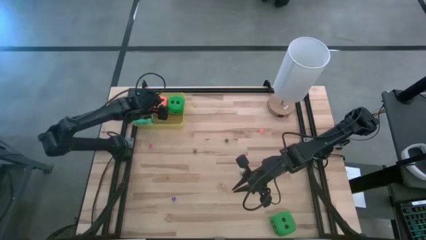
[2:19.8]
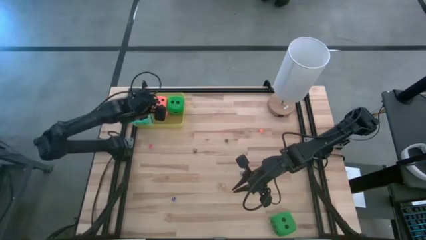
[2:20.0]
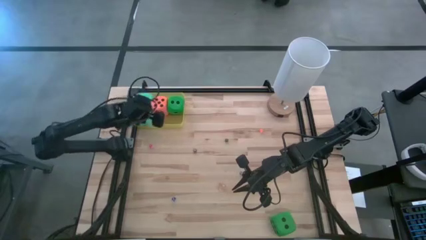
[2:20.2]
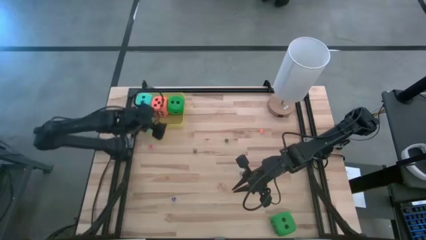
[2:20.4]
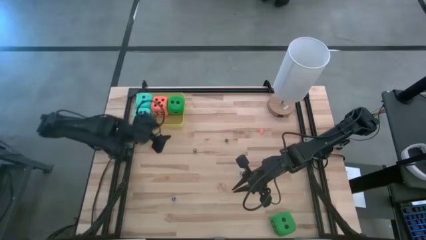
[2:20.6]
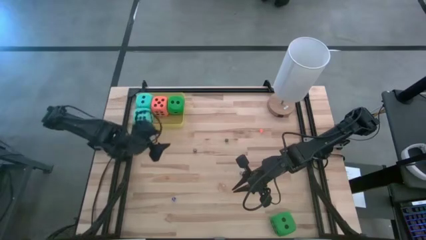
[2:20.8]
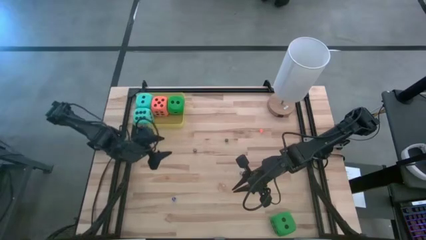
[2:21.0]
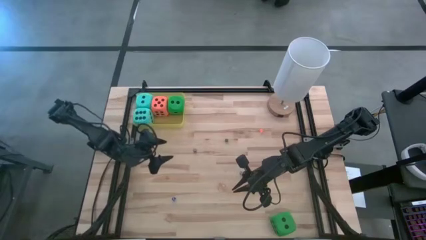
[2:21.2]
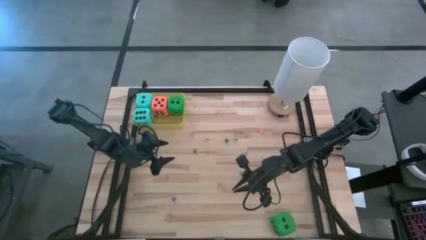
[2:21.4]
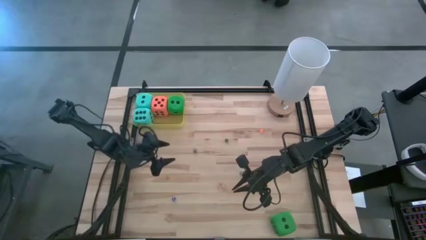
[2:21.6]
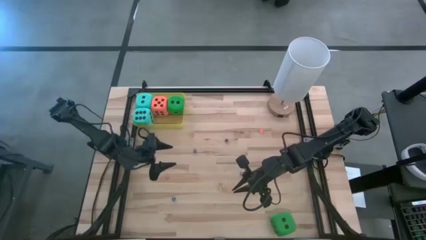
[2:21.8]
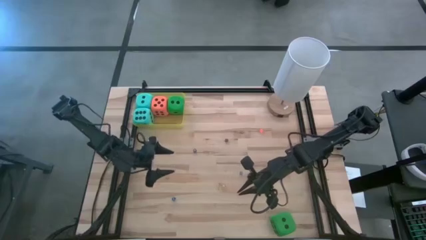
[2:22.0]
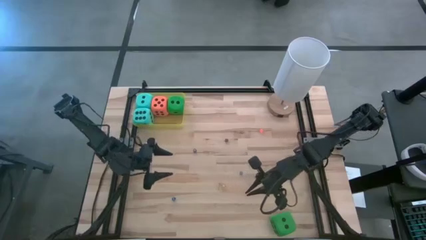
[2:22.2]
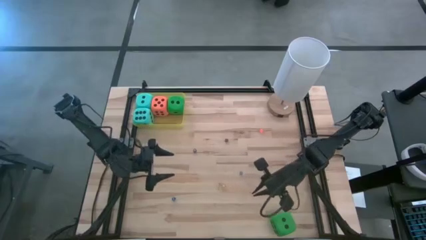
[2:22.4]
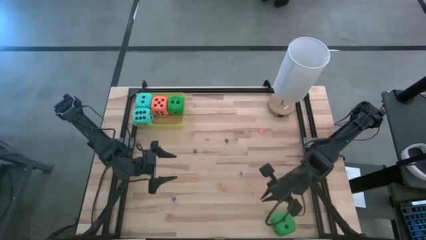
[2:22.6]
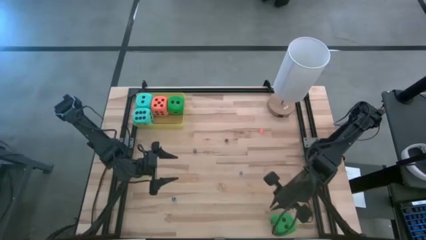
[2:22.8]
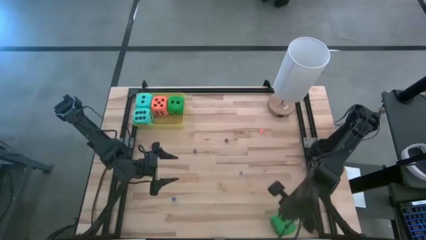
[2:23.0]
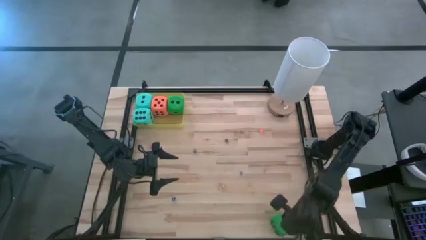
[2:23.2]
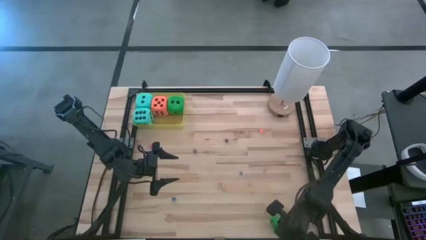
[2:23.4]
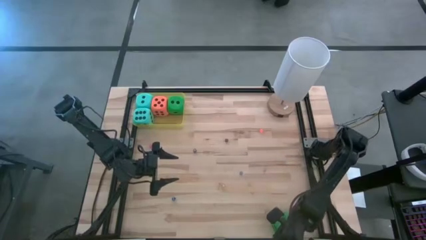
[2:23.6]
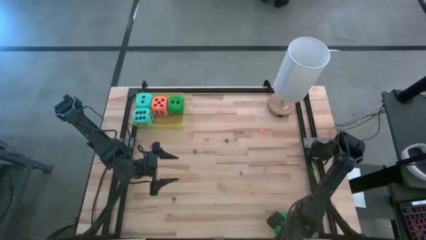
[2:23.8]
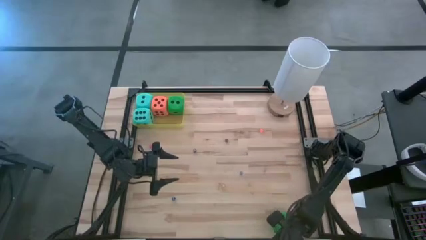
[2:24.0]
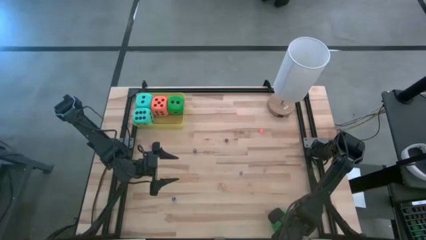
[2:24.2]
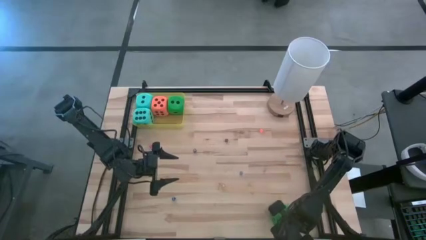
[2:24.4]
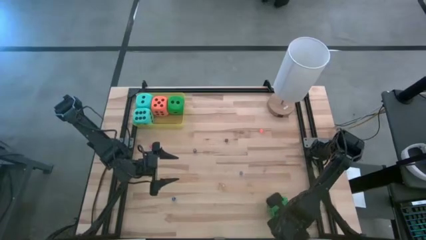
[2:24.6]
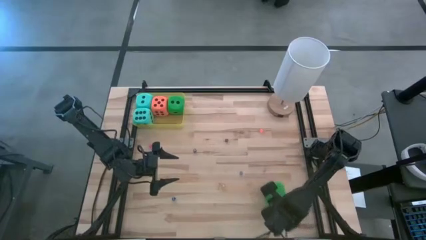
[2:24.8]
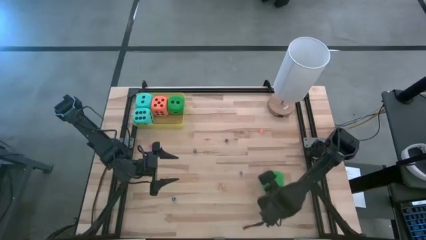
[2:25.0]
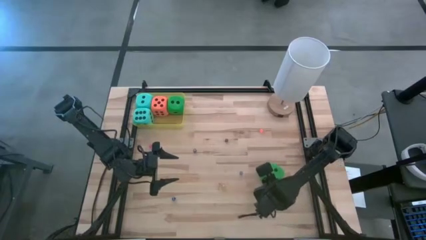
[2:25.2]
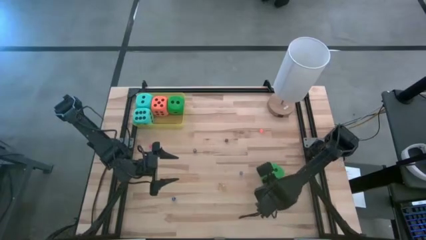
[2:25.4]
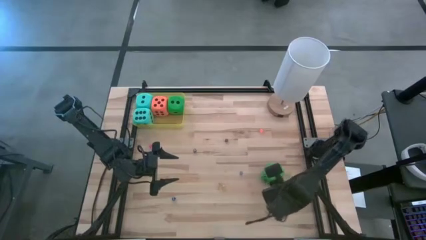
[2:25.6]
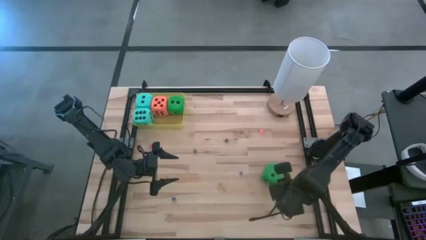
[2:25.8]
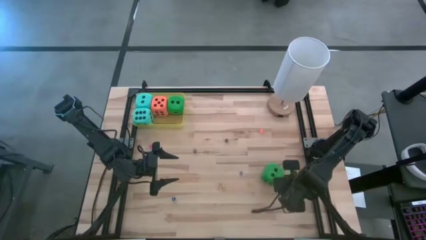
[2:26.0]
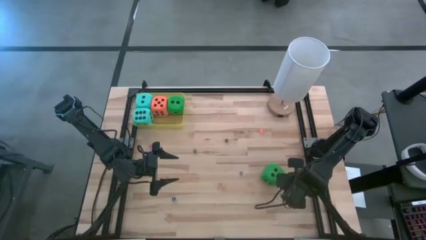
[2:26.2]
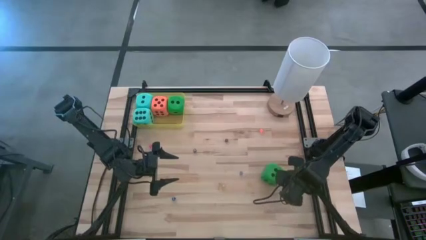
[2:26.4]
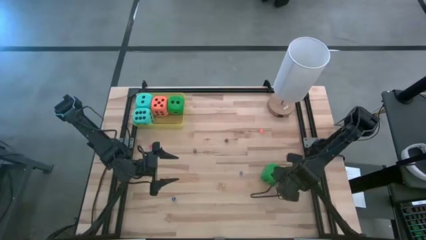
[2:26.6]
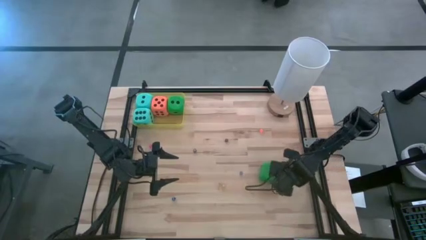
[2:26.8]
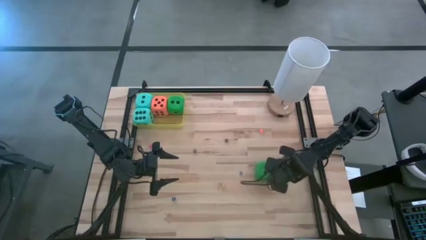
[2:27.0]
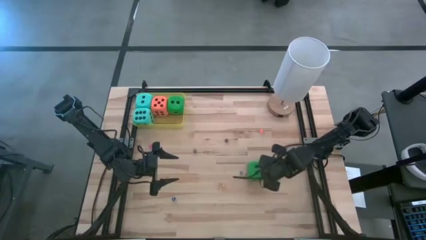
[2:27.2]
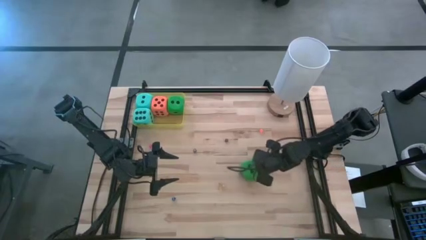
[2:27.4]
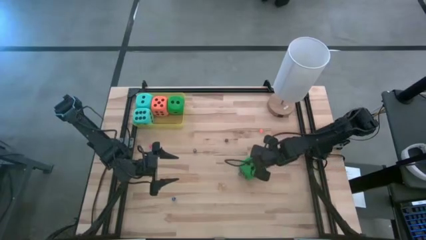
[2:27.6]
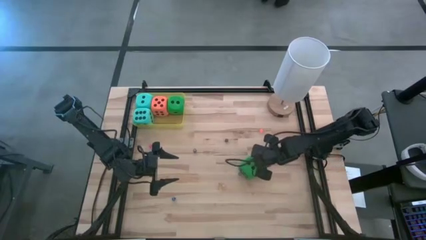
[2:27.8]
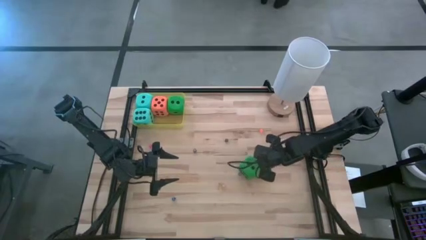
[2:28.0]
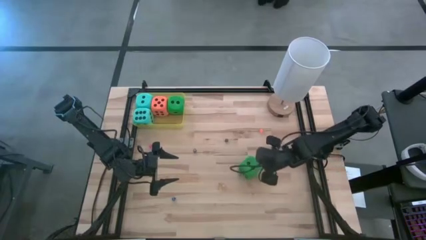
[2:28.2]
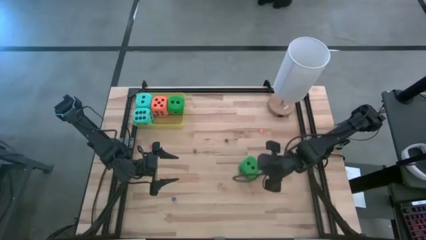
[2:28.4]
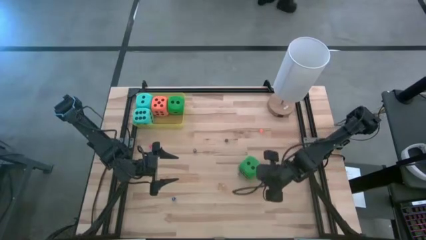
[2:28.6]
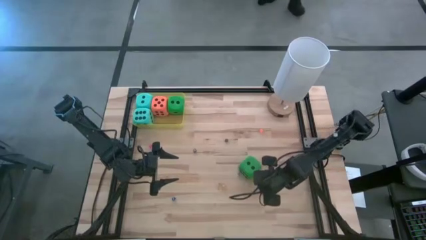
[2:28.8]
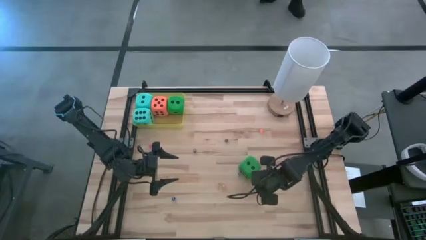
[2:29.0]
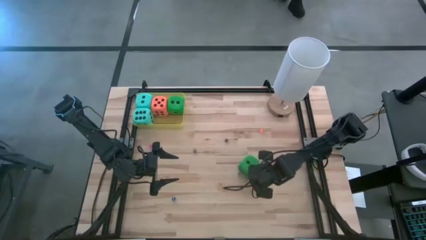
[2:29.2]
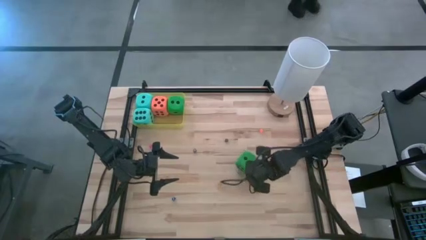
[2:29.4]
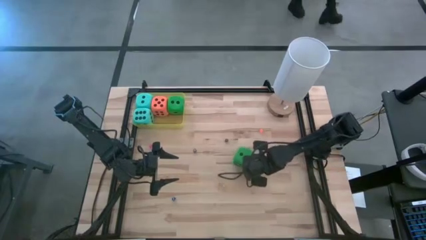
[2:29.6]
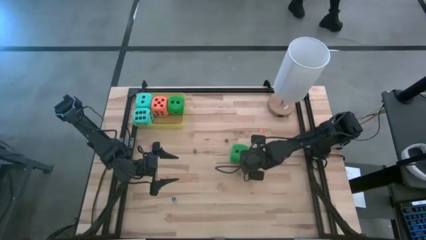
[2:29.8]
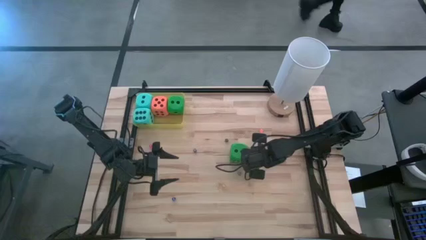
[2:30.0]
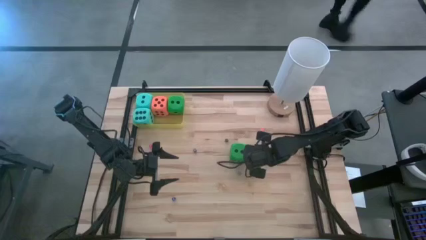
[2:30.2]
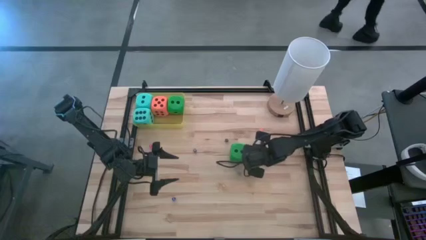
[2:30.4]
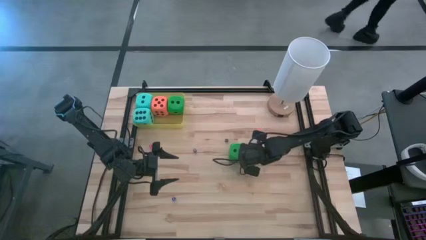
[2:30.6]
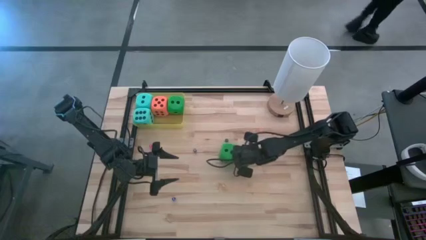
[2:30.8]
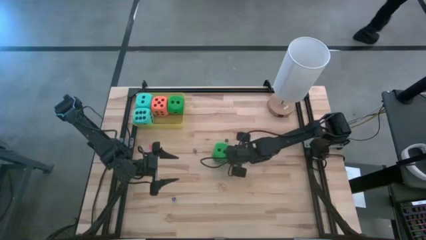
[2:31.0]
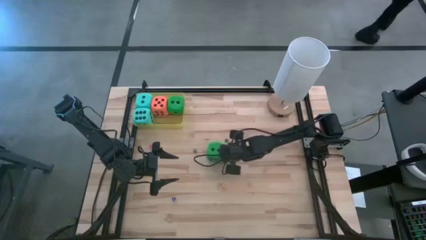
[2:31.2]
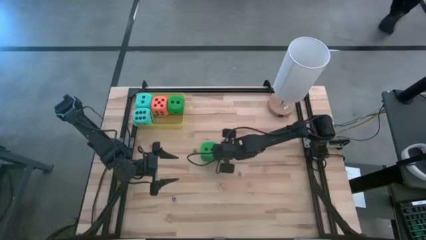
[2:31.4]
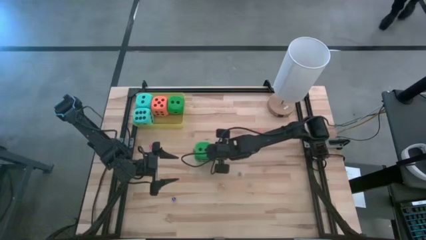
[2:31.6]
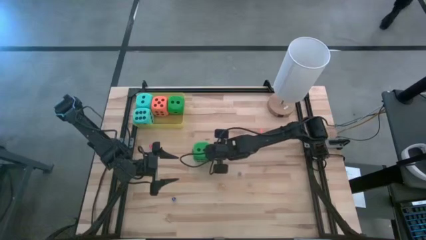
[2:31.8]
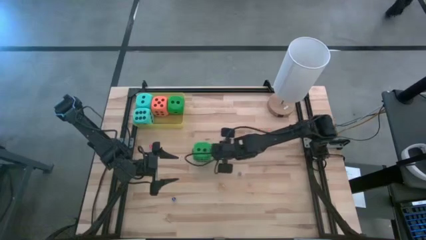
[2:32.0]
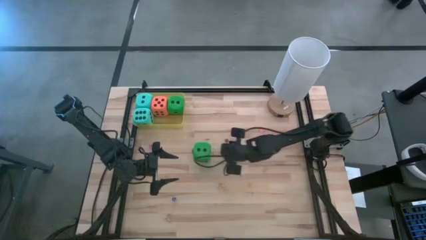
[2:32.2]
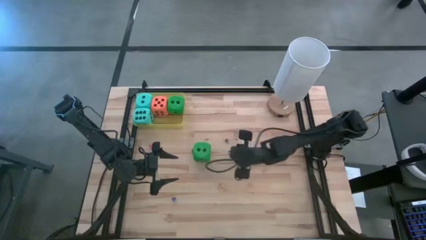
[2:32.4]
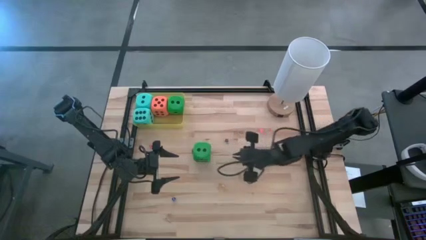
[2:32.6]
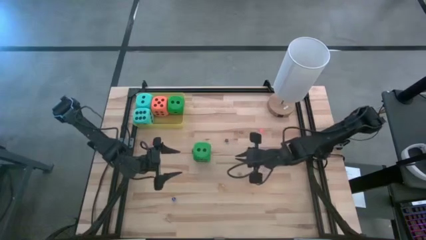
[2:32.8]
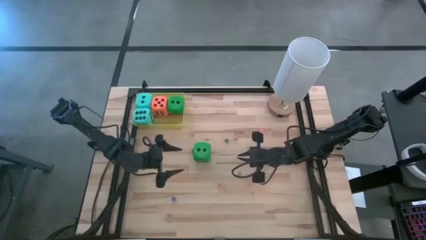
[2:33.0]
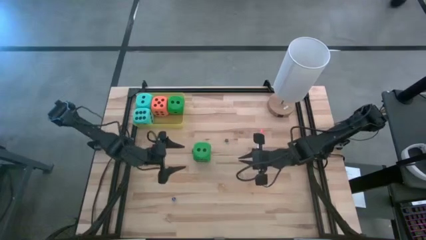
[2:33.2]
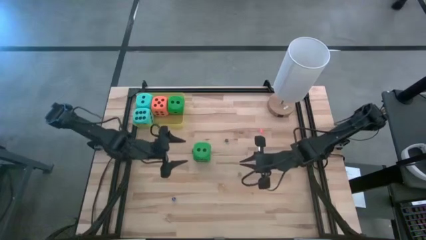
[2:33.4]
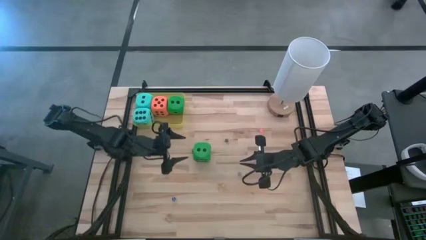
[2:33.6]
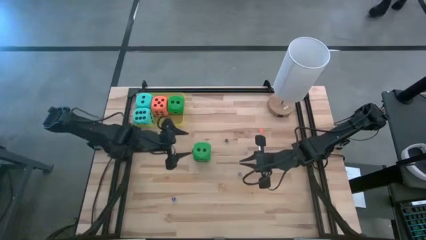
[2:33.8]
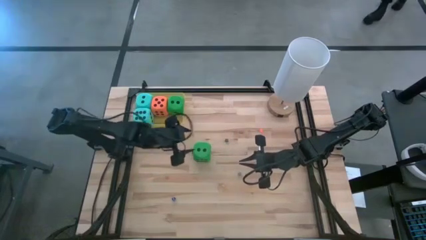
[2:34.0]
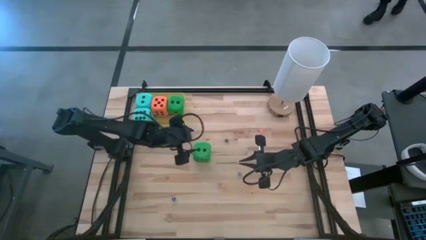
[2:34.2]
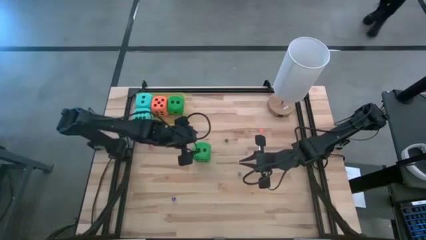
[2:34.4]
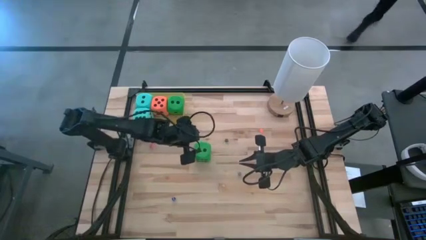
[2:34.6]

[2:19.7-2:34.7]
Task: Pick & Place Dice
Put the green large die into the yellow container

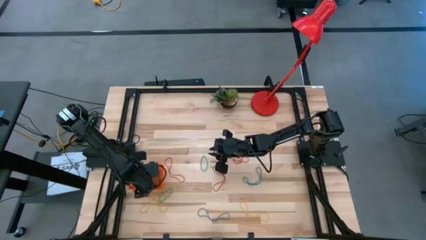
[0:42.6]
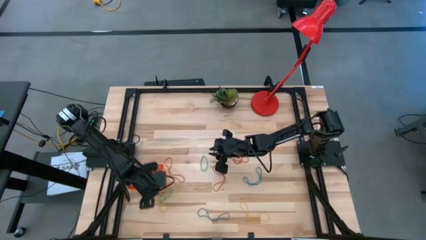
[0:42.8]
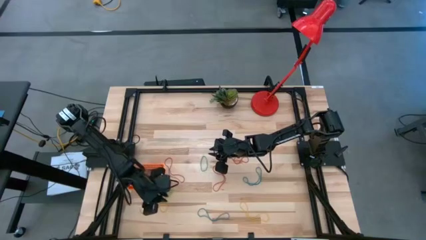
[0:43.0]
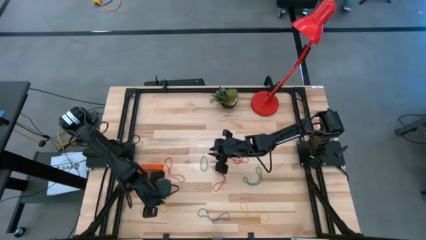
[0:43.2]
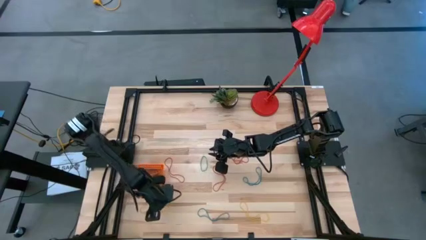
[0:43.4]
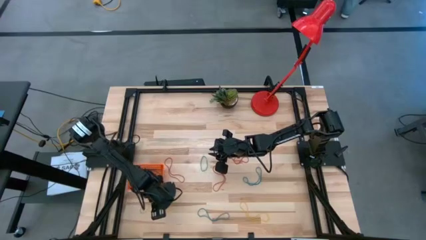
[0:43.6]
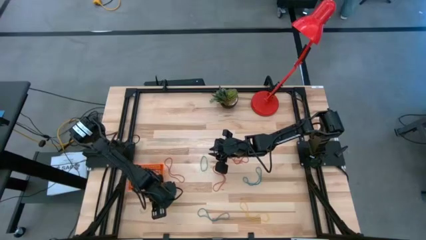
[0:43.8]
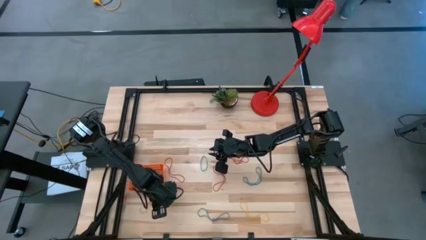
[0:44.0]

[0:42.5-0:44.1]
Task: Pick and place rubber bands into bin
Put the green rubber band into the orange basket
